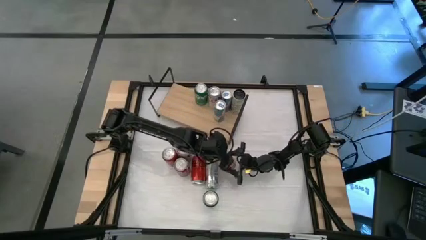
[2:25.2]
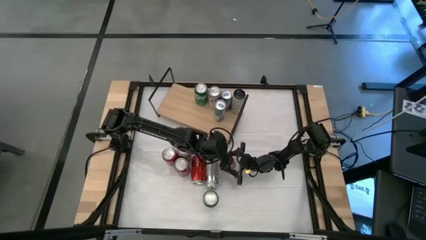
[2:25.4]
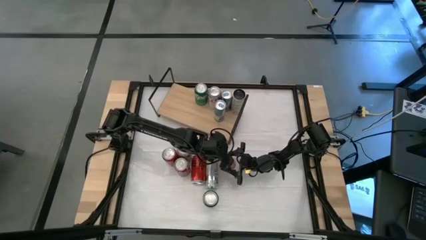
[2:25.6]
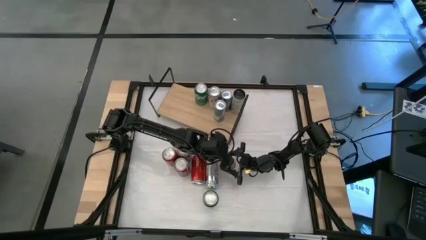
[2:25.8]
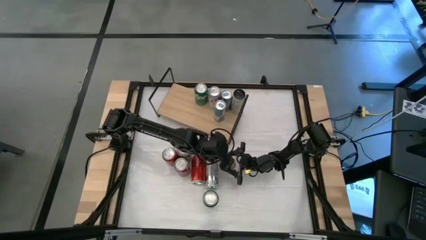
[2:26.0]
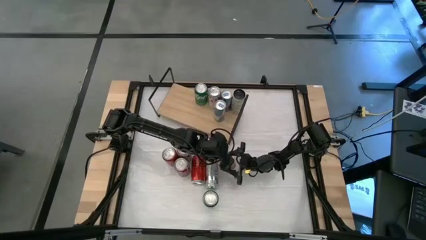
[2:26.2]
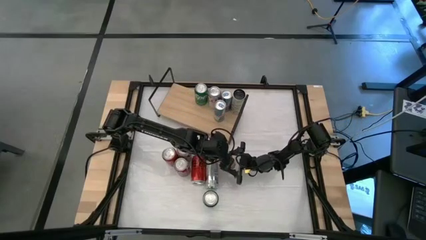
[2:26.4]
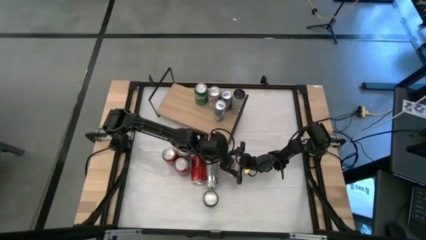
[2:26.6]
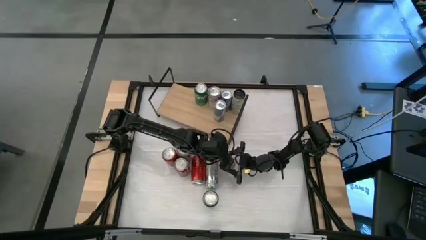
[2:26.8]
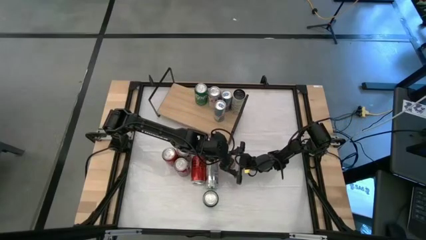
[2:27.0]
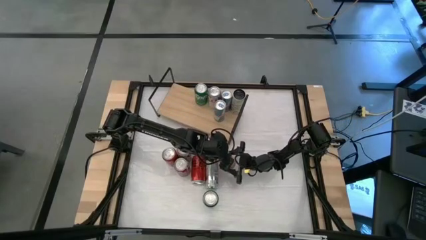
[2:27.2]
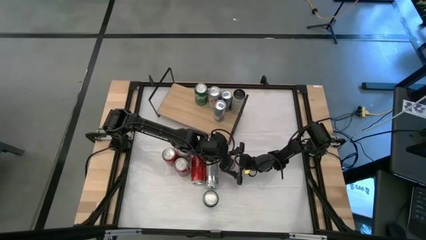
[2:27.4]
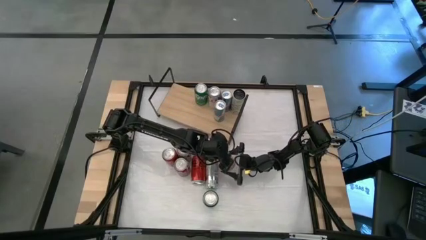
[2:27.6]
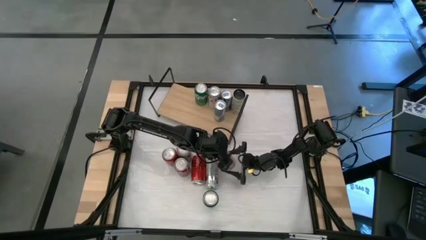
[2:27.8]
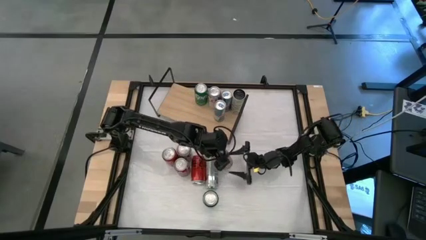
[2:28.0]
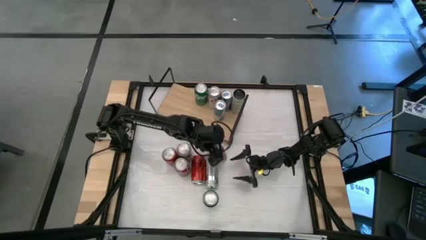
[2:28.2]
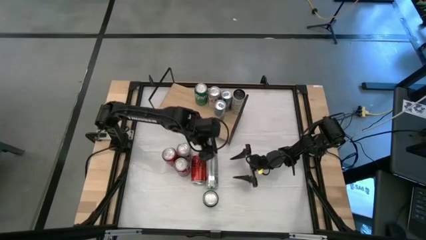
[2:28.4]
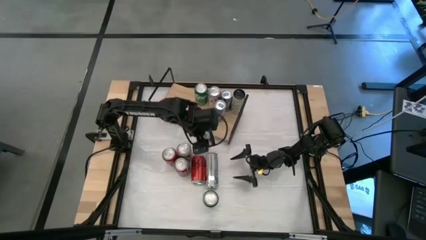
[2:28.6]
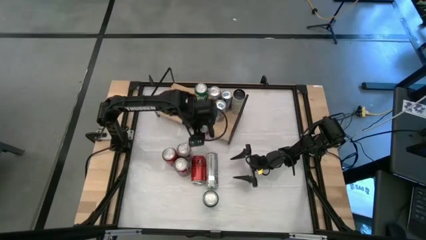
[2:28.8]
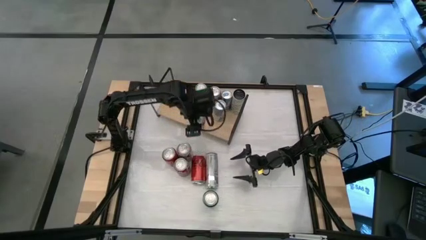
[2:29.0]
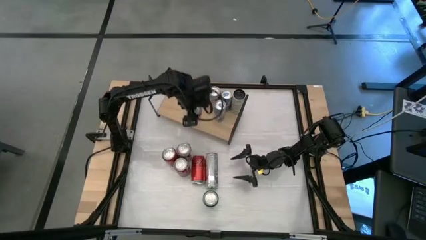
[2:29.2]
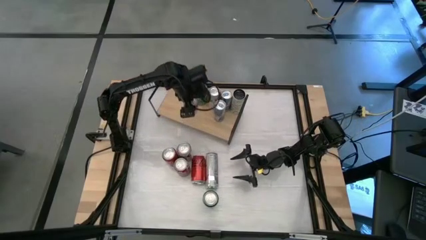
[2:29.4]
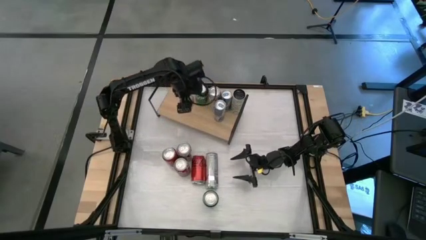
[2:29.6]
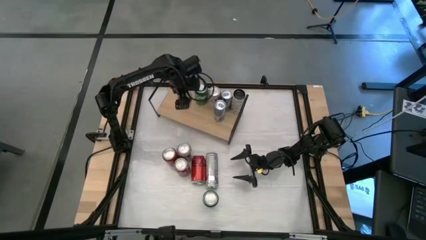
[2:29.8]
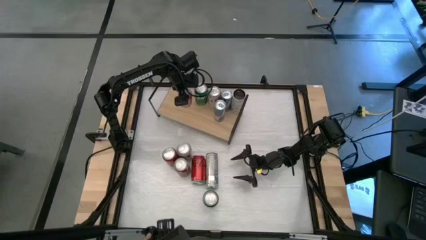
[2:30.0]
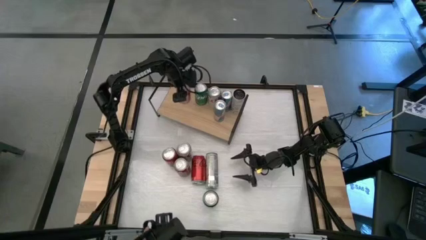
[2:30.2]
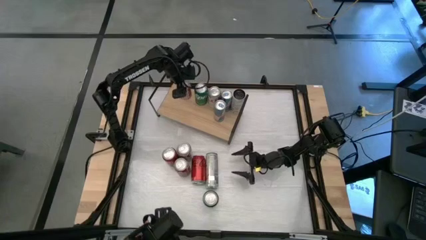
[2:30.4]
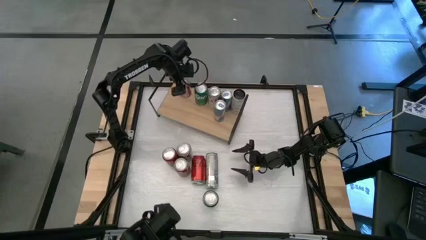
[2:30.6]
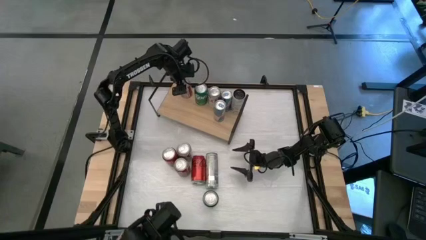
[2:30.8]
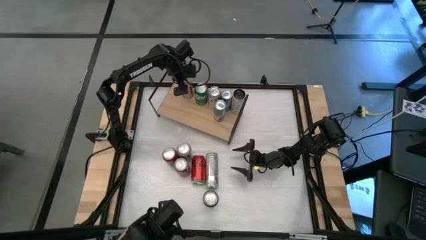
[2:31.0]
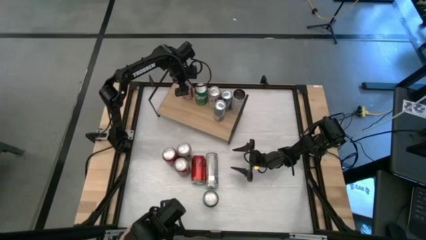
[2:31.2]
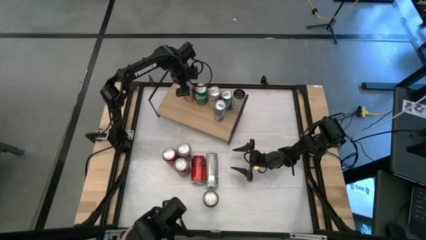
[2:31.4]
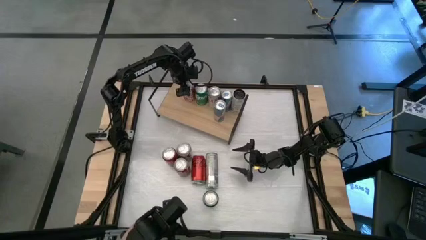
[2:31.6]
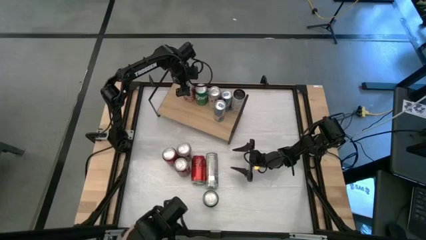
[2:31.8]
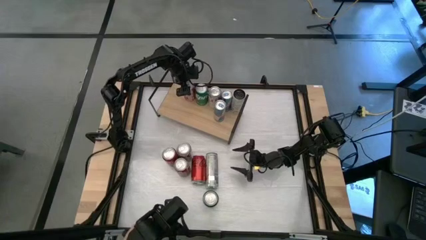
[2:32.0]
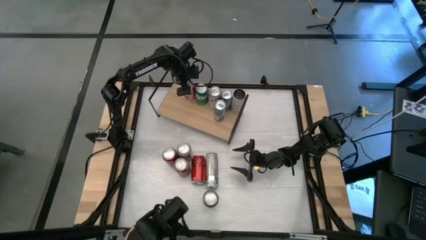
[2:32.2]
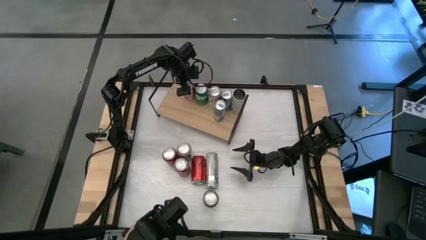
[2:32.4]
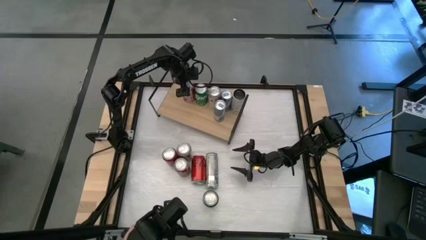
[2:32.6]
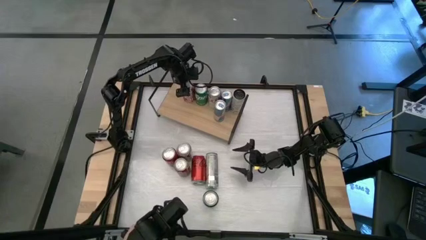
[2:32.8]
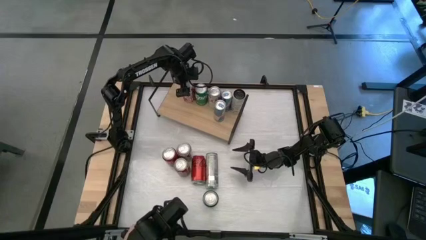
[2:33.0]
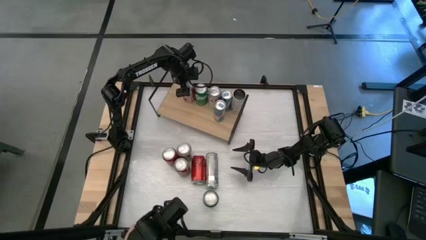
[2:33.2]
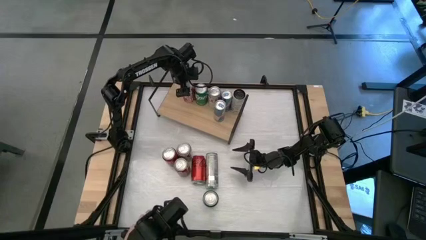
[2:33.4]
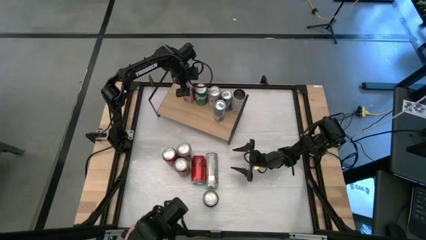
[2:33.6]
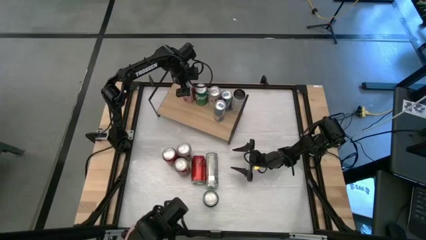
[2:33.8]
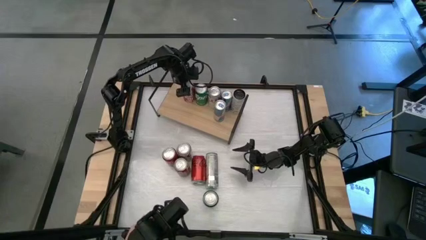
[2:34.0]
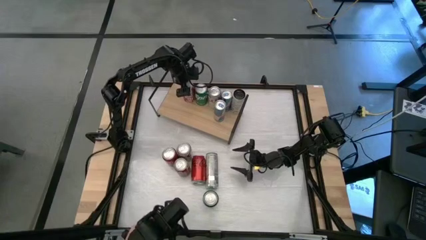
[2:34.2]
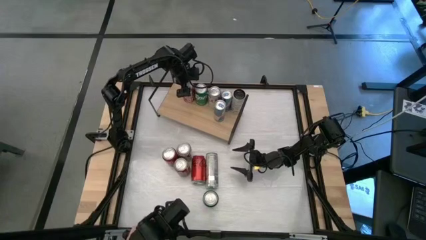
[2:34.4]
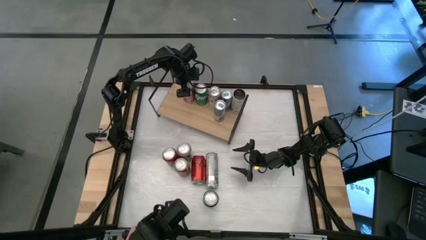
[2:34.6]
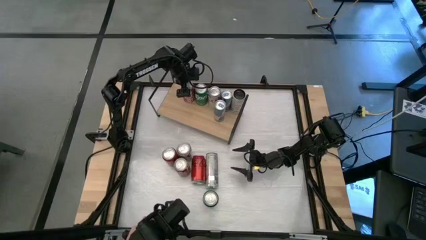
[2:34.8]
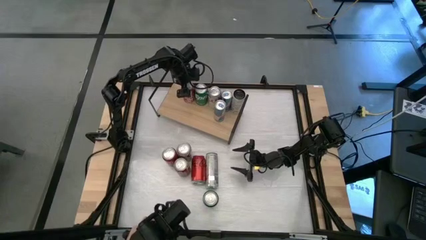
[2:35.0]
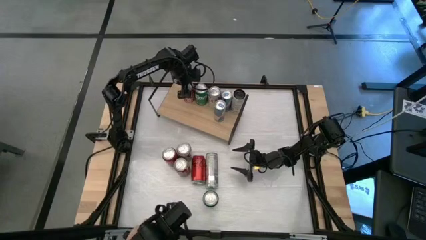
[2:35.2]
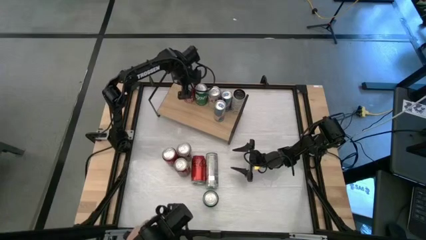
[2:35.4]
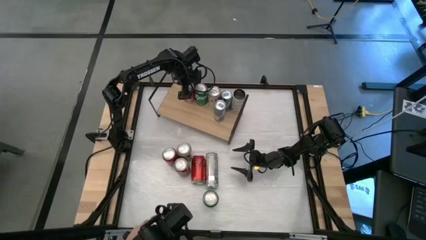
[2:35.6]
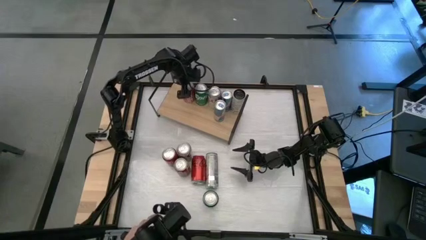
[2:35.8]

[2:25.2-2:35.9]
Task: Place canned beverage on shelf
Put the right red white soda can on the shelf

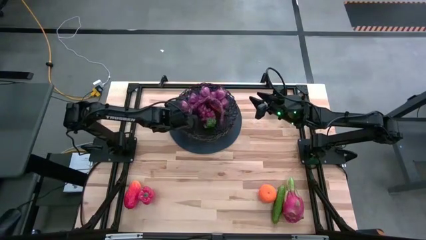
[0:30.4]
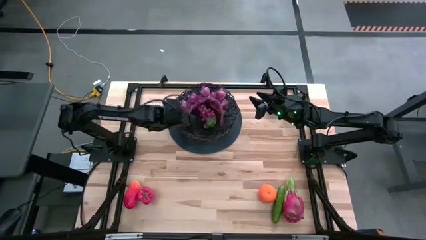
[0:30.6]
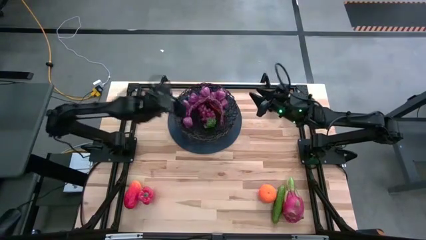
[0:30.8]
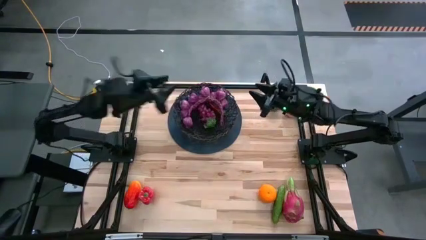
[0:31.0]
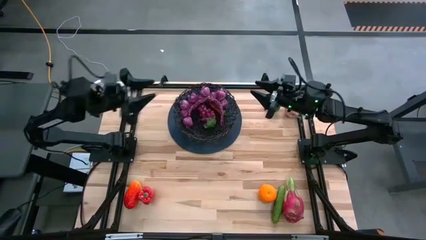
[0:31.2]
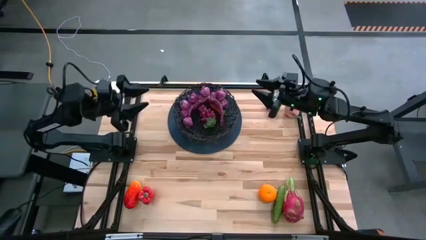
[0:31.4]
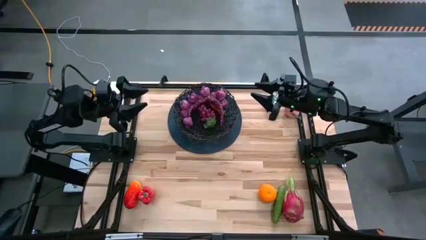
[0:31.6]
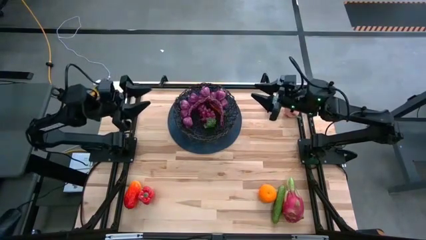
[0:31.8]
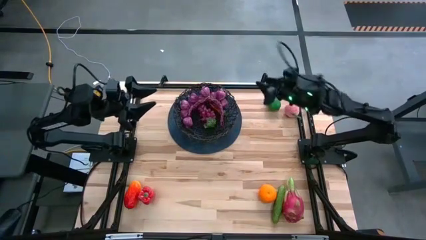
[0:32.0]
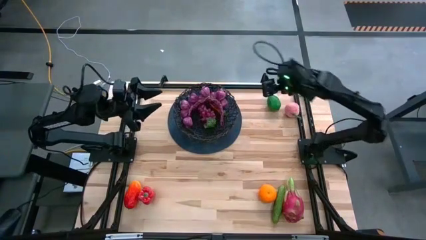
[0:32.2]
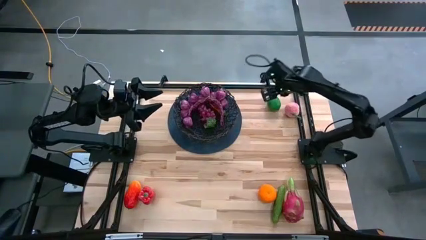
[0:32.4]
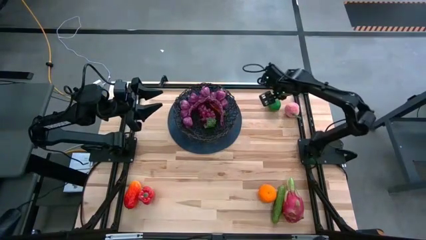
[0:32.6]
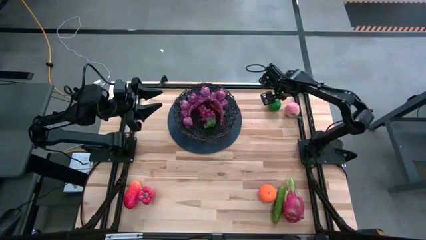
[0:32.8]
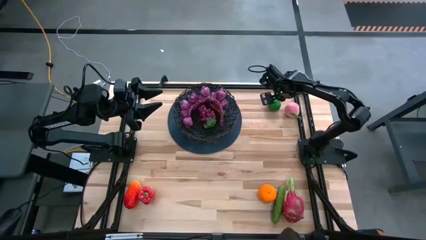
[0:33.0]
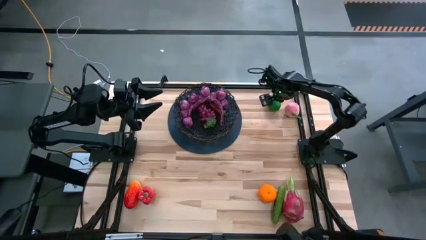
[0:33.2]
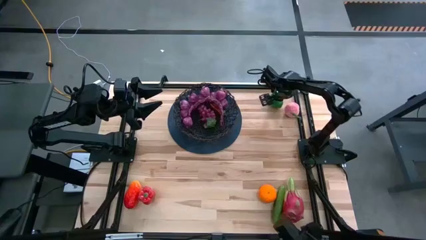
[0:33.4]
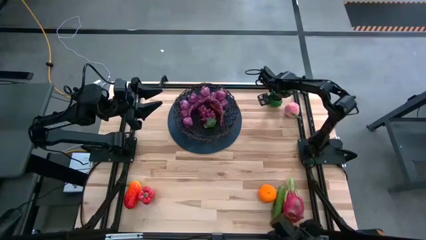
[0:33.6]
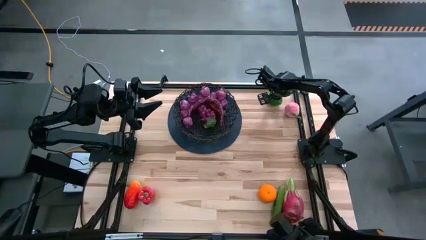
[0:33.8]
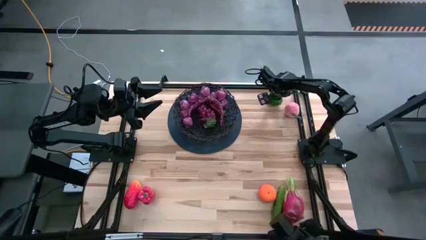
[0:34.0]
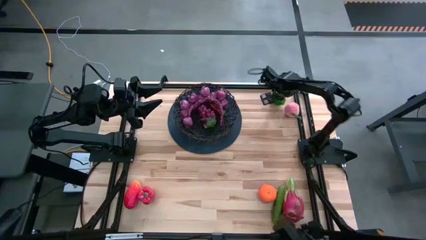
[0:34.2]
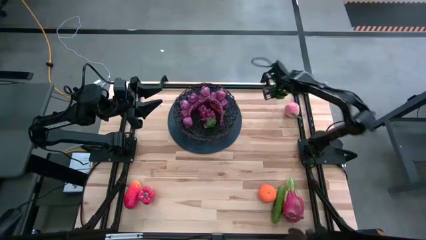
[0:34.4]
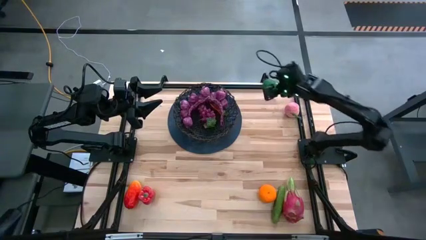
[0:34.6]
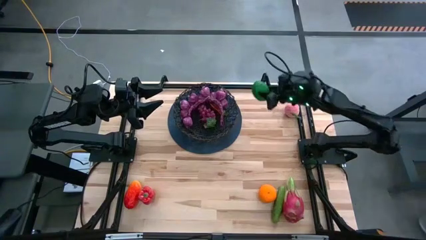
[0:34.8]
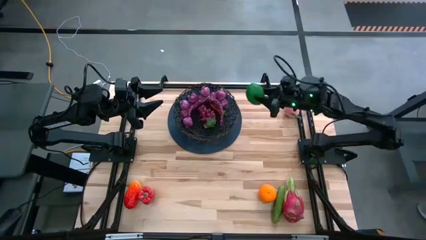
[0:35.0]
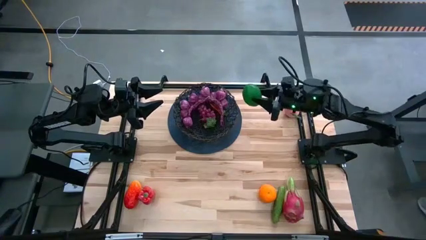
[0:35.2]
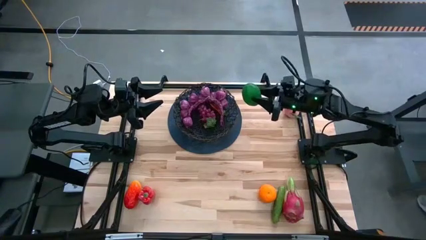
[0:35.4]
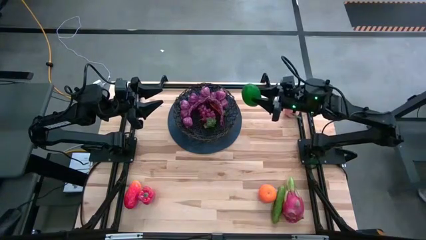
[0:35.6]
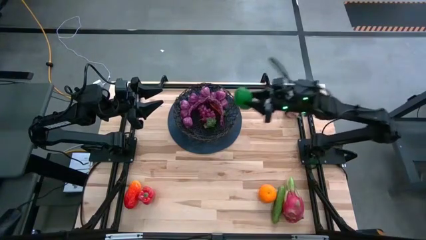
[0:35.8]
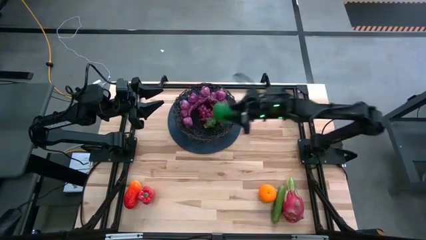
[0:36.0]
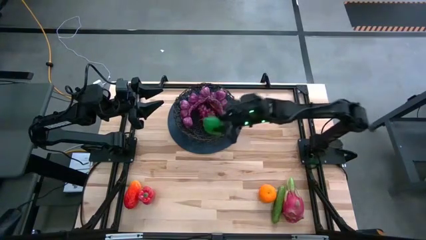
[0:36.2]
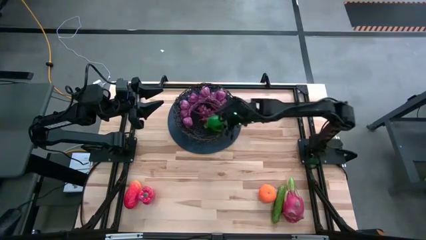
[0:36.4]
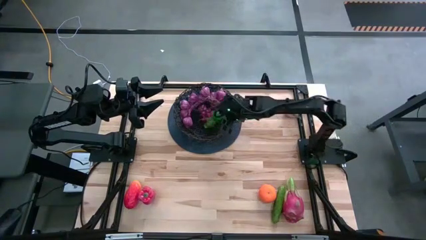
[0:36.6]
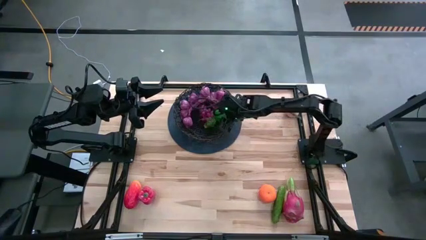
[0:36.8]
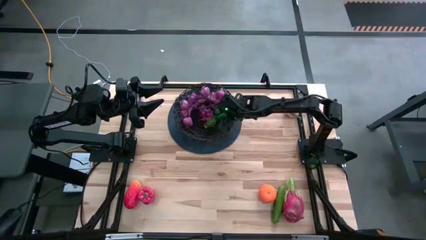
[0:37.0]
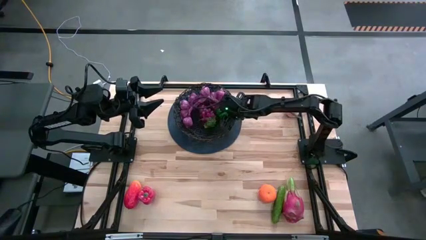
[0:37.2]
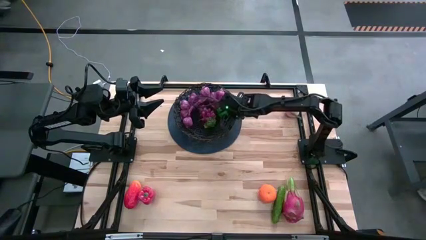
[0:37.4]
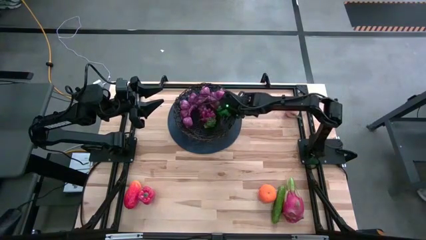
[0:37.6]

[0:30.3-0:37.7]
Task: Build produce basket
Put the lime into the wire basket
